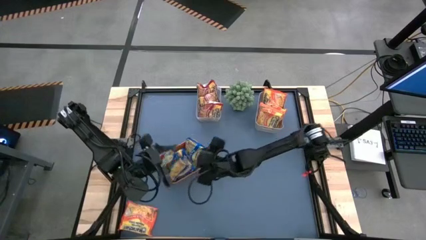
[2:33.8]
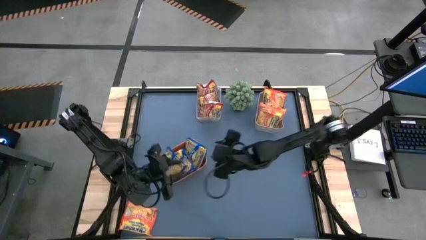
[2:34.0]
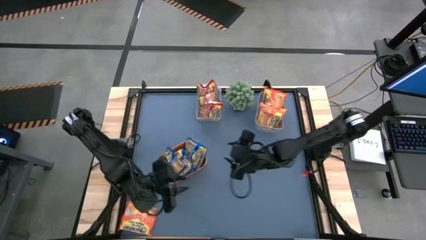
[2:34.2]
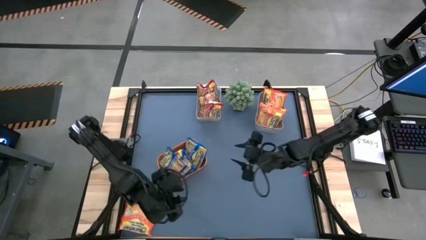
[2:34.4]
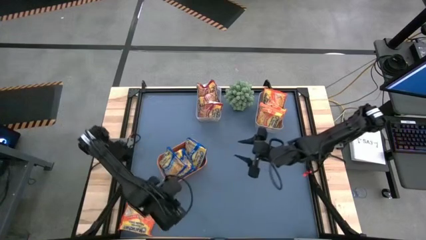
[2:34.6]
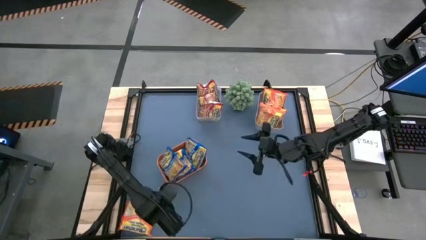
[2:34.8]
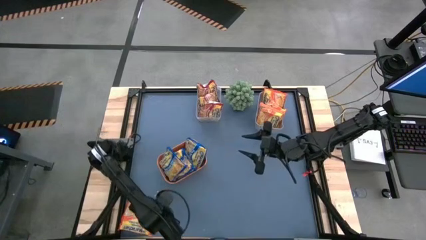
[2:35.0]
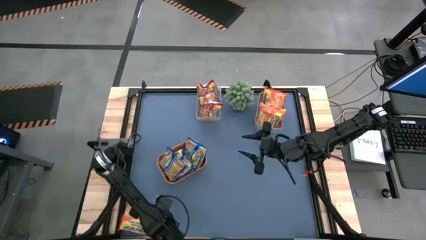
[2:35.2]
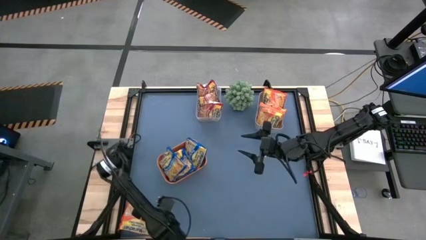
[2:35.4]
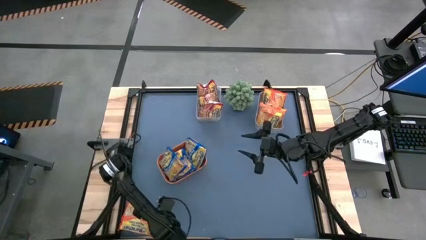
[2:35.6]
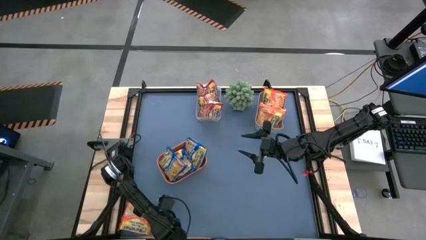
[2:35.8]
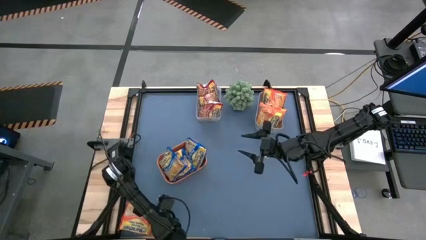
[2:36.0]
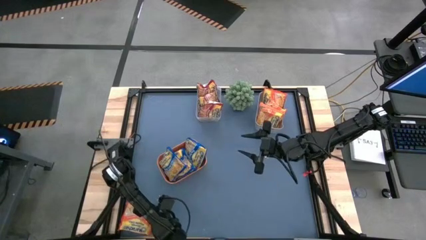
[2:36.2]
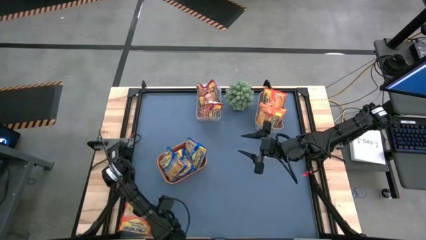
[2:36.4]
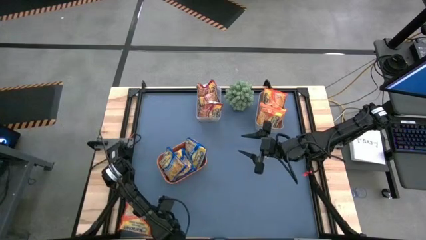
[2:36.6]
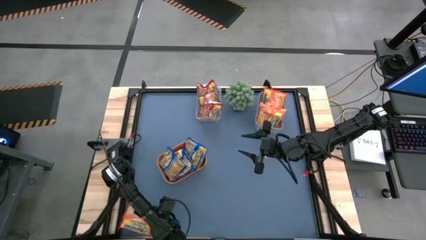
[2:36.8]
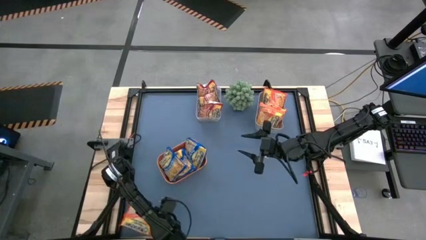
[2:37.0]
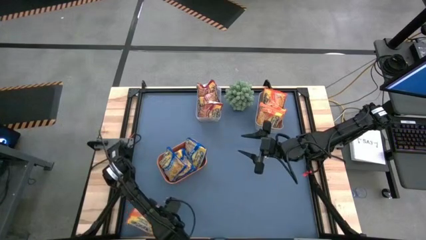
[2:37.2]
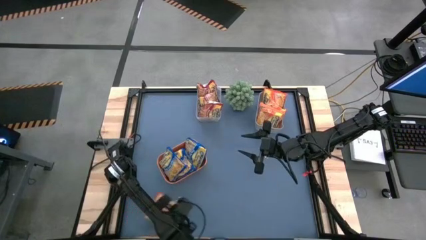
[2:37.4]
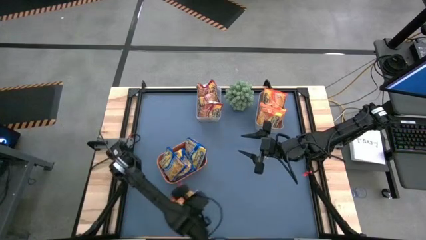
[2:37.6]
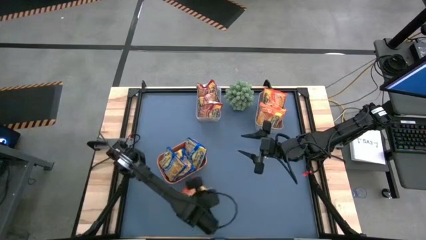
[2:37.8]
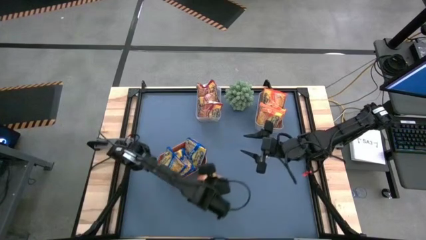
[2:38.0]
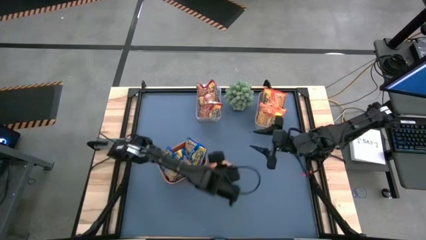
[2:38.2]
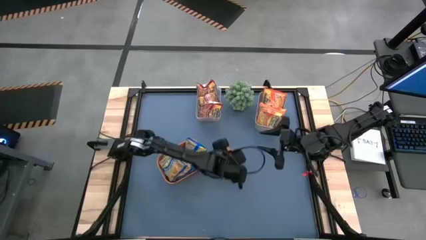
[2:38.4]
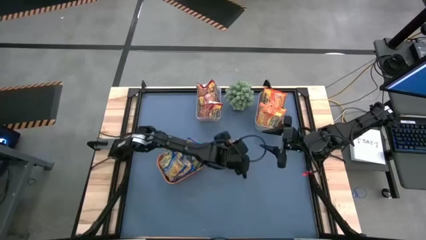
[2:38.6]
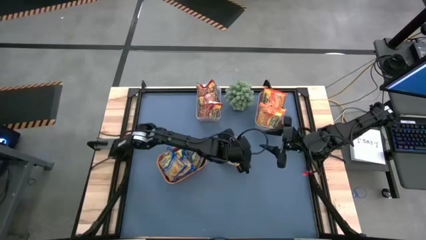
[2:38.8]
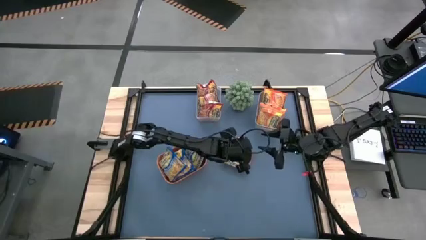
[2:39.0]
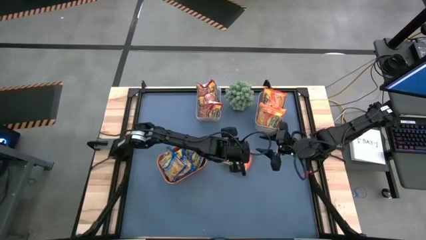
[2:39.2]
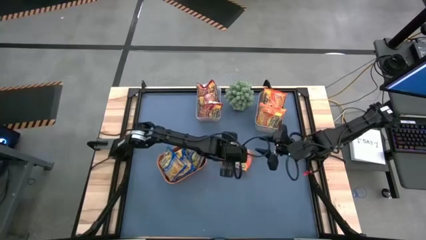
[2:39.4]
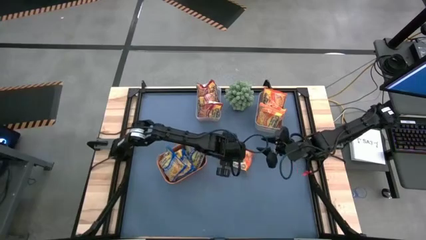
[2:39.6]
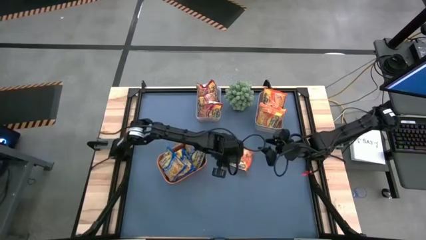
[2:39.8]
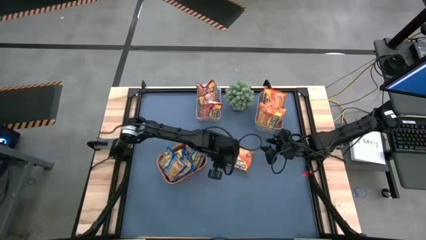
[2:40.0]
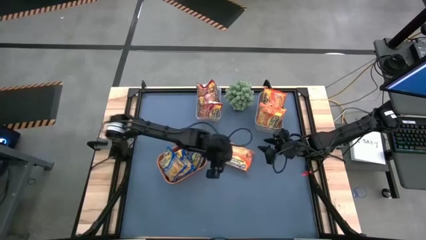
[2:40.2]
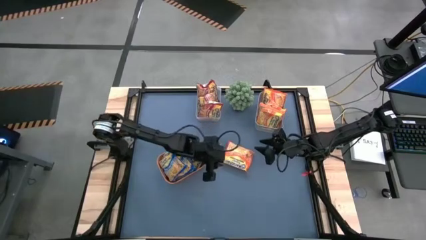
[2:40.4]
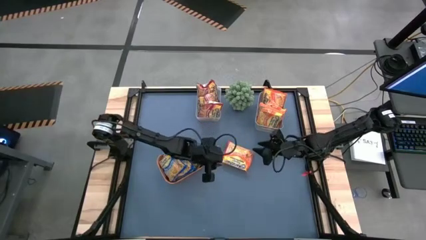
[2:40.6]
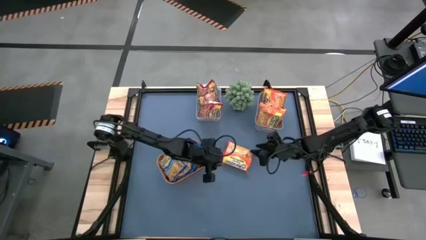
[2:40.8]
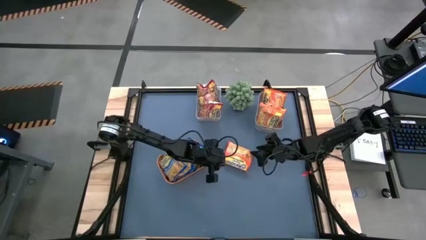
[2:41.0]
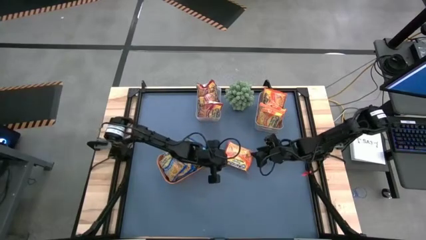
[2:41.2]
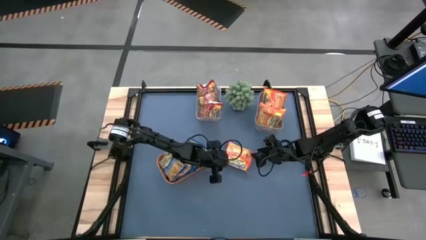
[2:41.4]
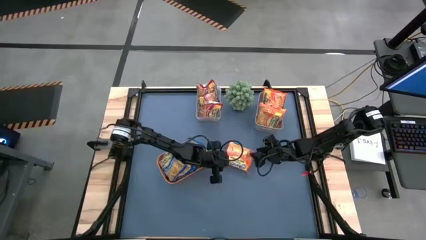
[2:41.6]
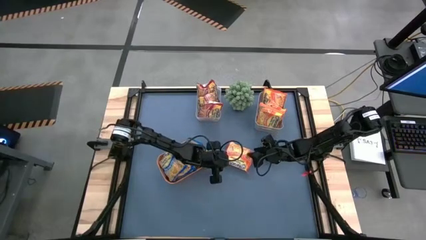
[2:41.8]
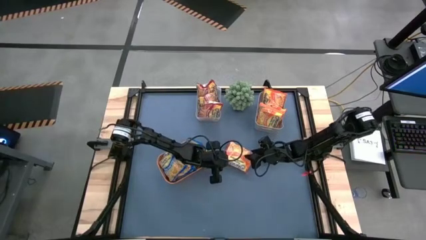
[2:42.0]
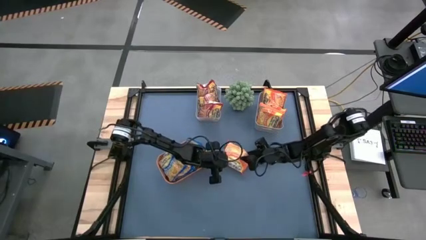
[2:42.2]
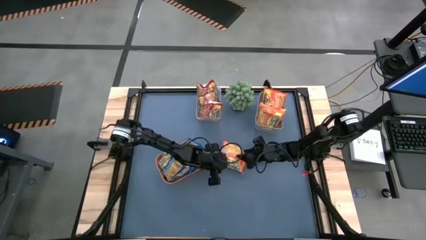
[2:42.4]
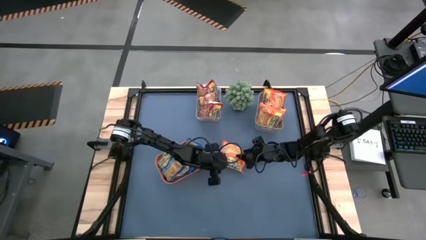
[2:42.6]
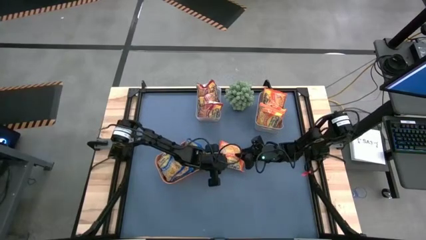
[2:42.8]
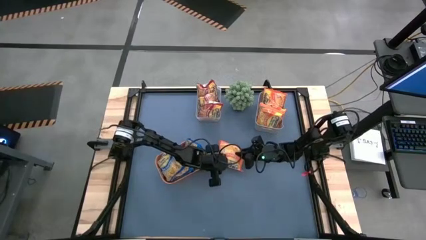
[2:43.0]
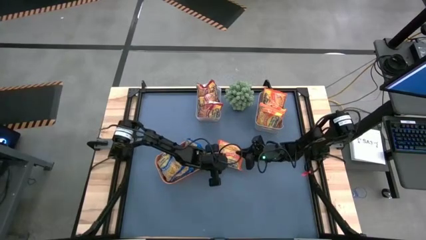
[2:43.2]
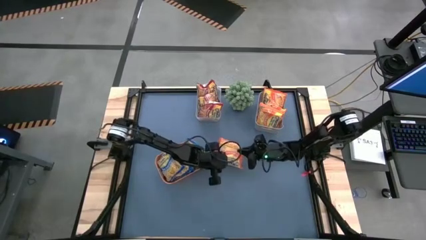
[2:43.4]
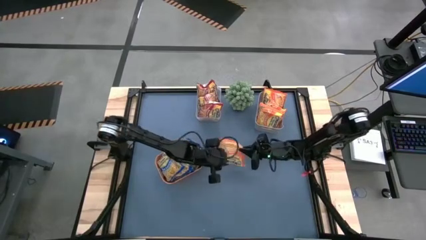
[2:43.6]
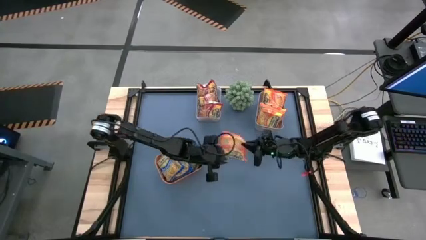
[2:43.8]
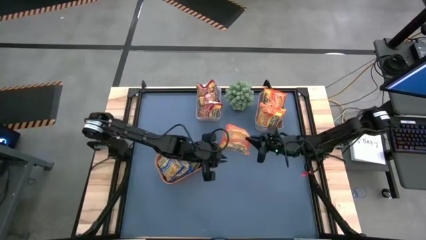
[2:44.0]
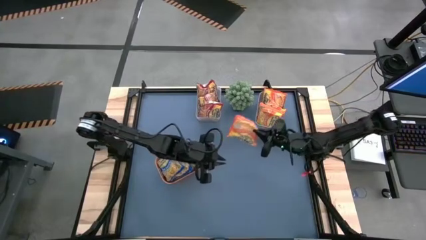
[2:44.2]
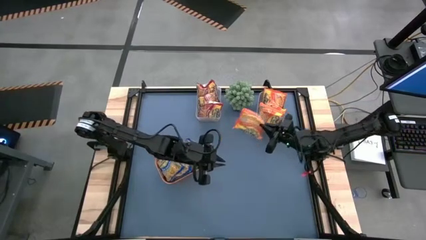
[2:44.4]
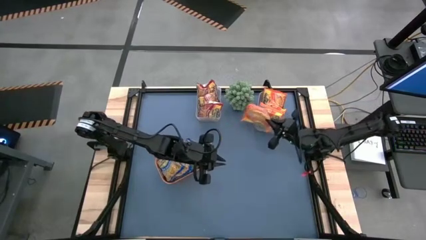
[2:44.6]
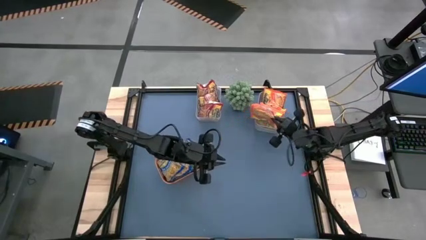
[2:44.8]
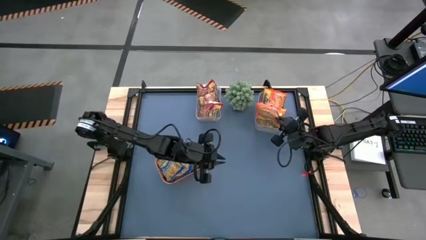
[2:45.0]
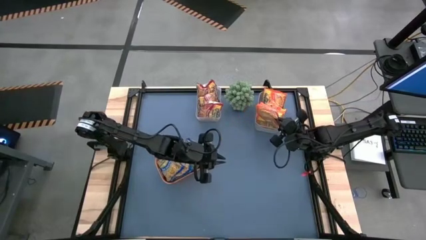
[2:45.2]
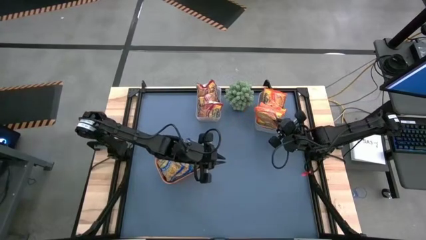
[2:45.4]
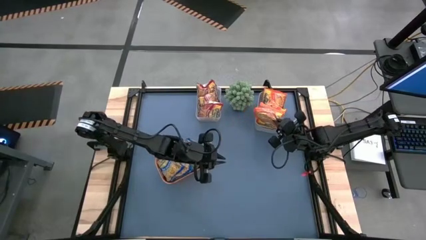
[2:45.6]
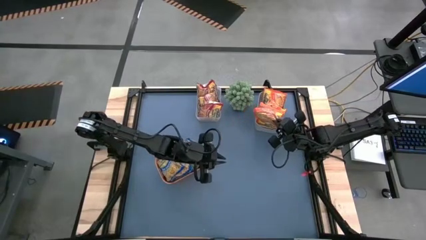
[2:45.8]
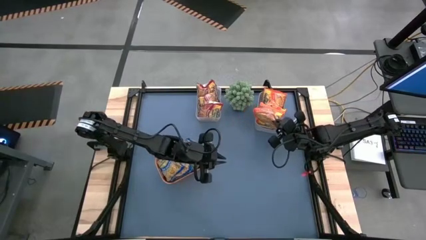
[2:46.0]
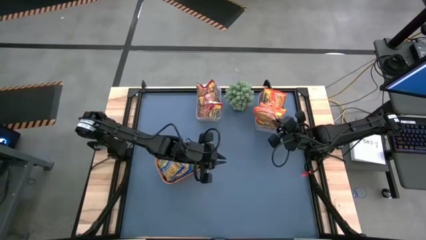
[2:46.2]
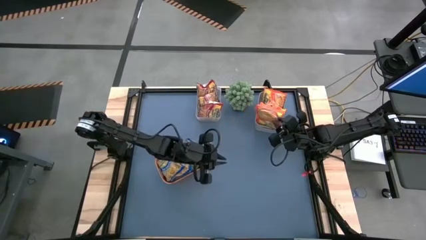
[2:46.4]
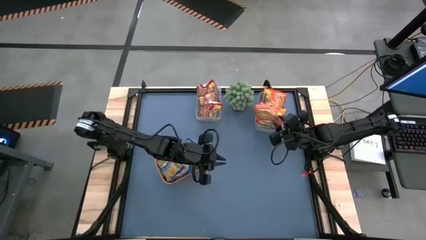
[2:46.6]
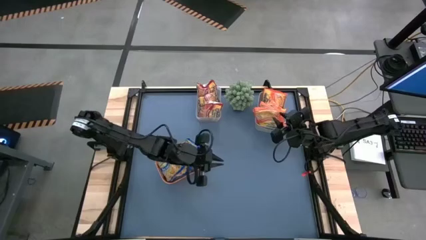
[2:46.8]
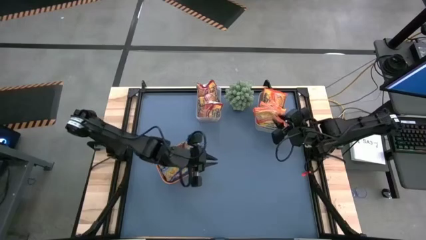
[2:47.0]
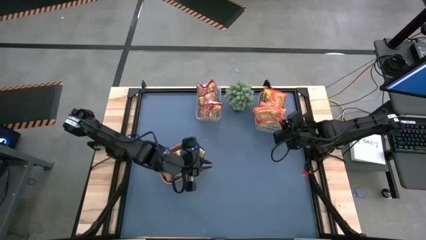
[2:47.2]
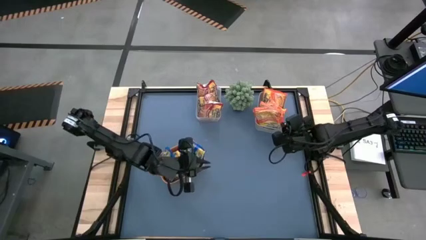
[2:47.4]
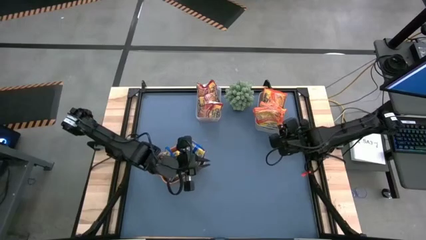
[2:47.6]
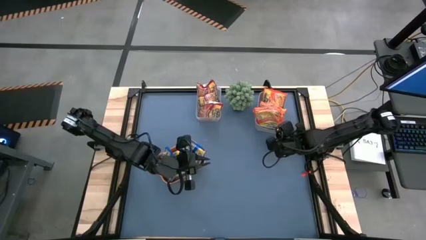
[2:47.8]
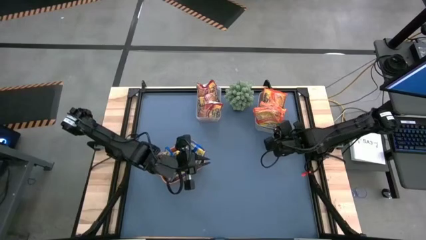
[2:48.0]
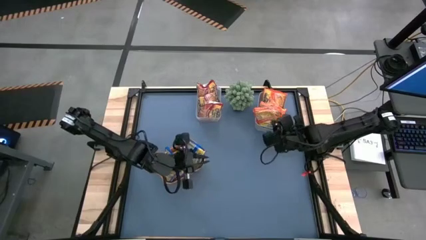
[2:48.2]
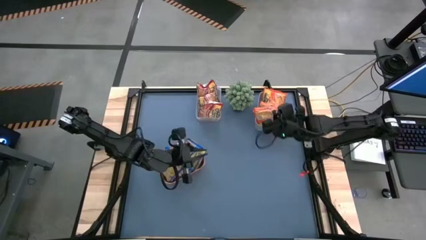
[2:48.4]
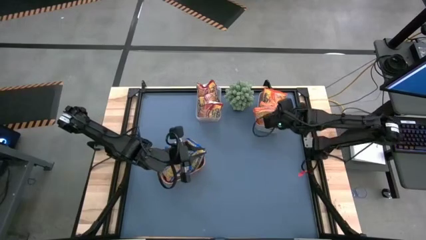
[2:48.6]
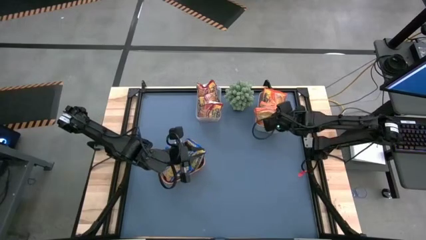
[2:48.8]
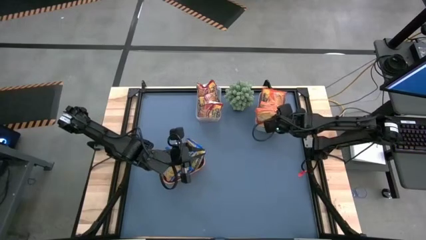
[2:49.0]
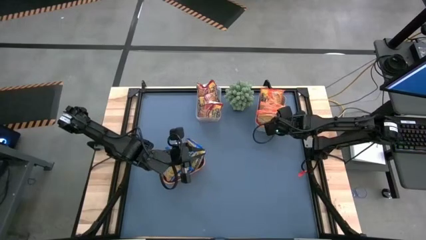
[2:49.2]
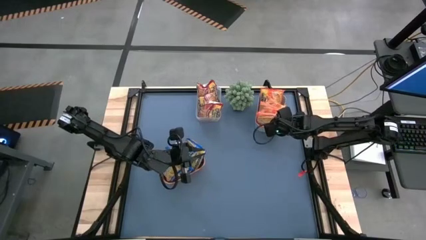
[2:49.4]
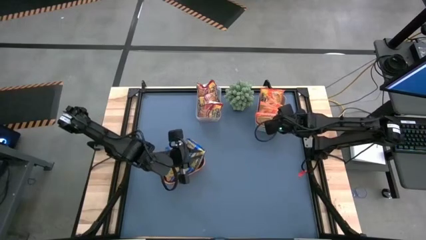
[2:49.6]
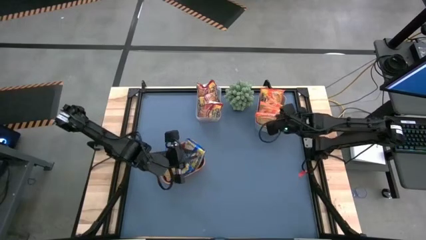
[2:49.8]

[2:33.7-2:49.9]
Task: Sort Maruchan noodles
Put the orange noodle pack into the gray bin
